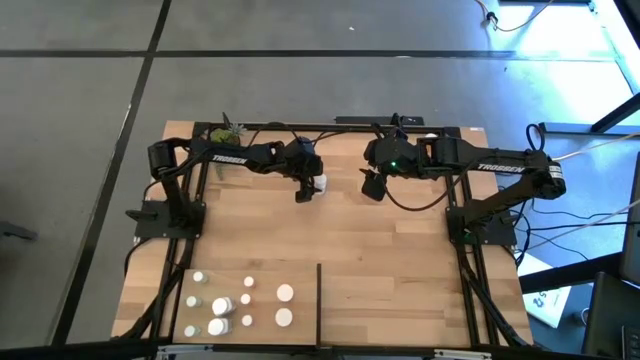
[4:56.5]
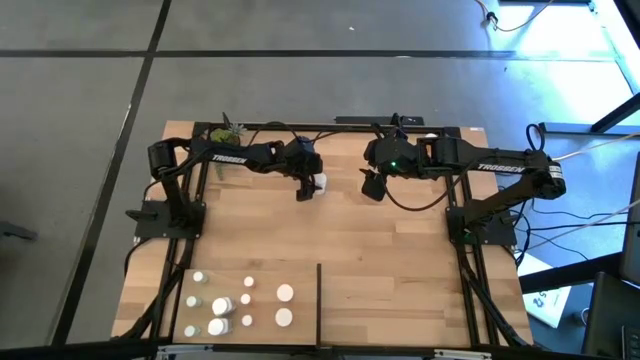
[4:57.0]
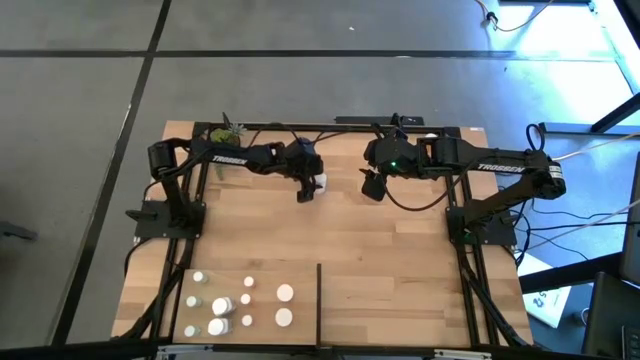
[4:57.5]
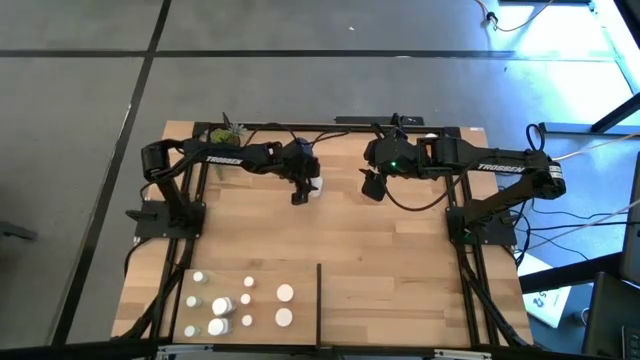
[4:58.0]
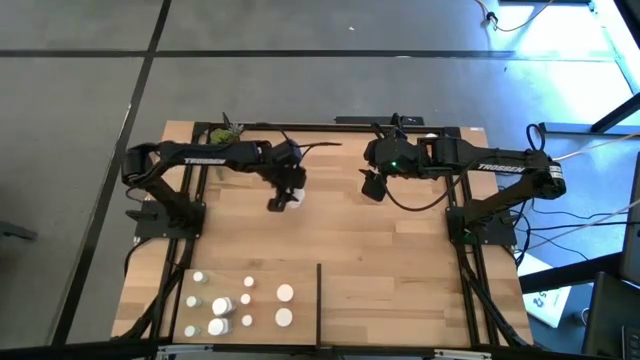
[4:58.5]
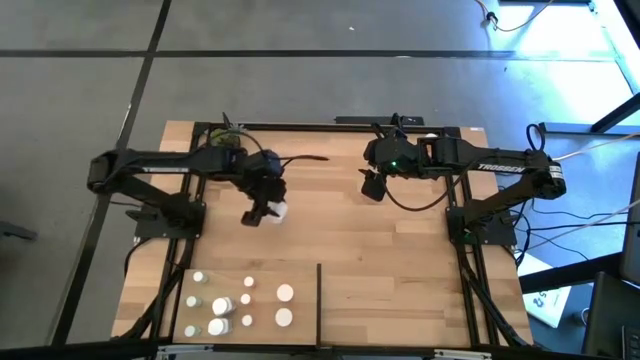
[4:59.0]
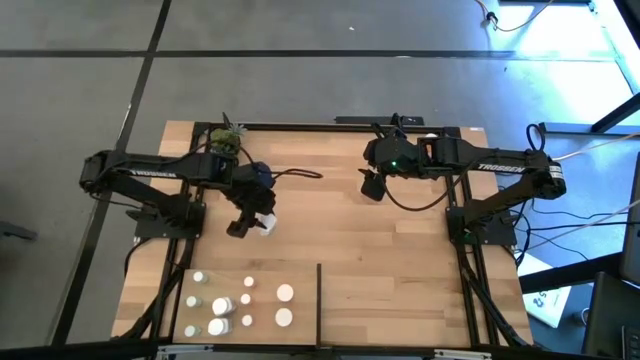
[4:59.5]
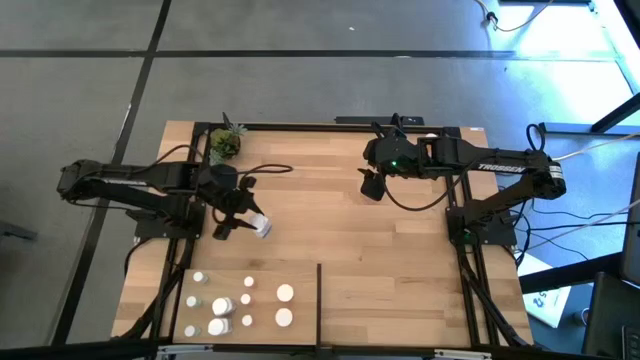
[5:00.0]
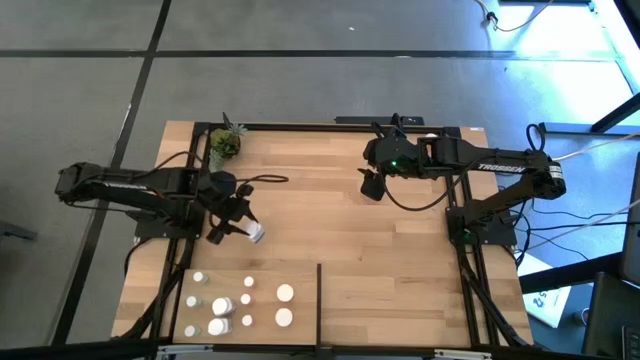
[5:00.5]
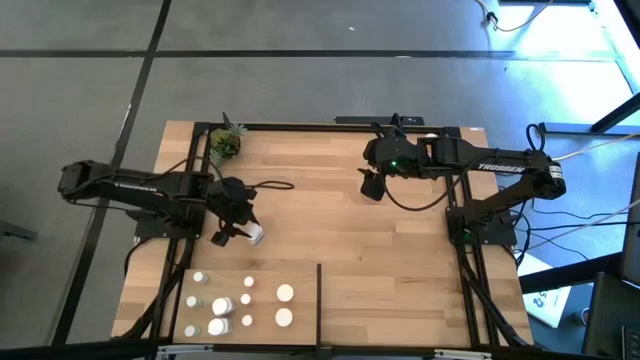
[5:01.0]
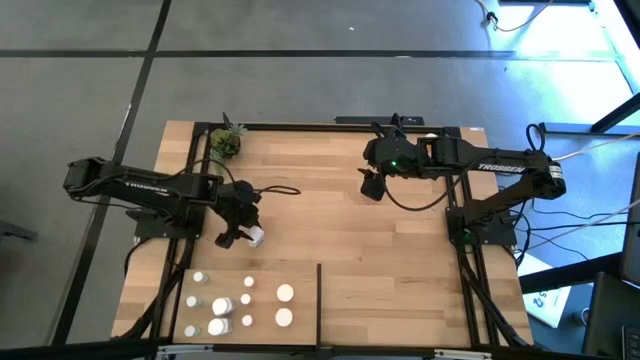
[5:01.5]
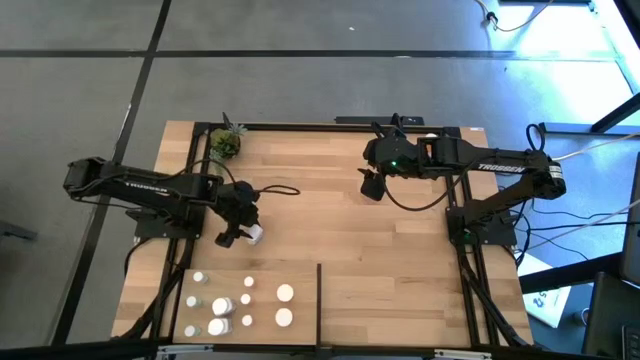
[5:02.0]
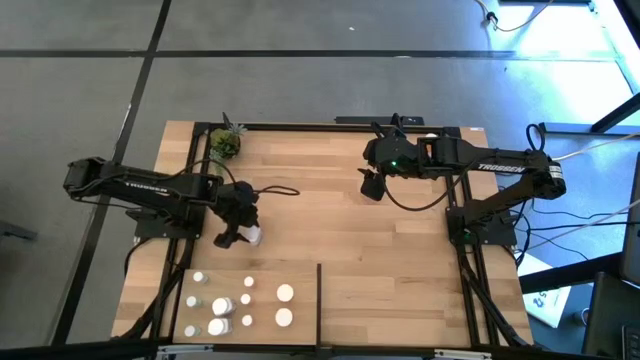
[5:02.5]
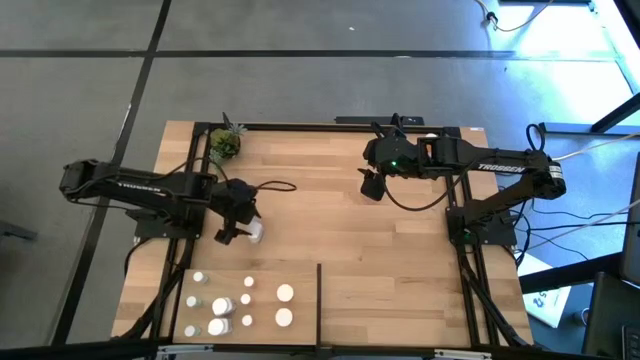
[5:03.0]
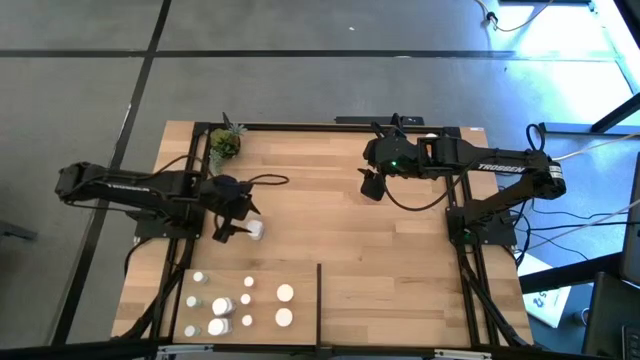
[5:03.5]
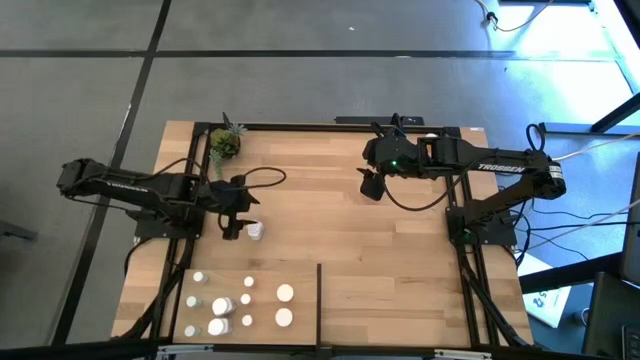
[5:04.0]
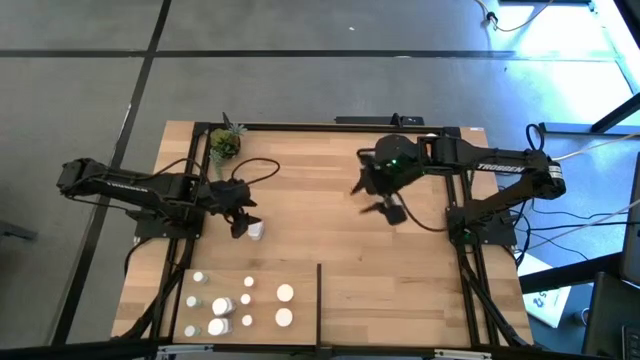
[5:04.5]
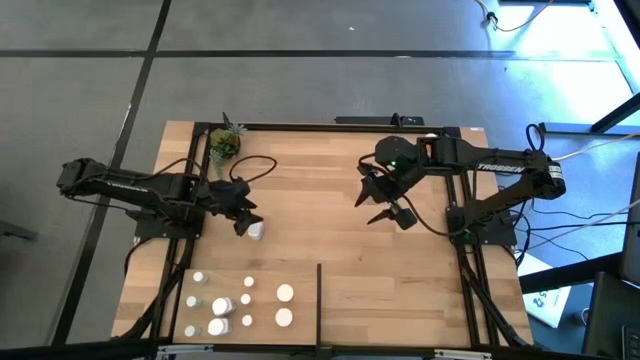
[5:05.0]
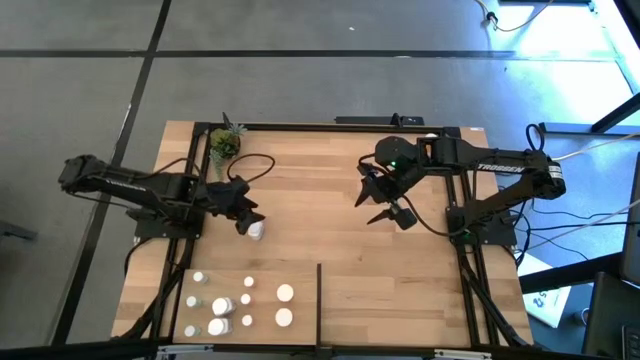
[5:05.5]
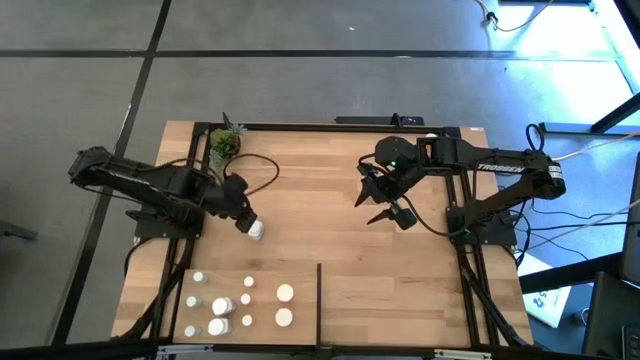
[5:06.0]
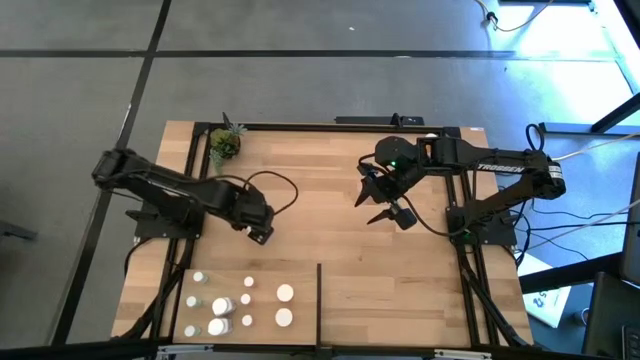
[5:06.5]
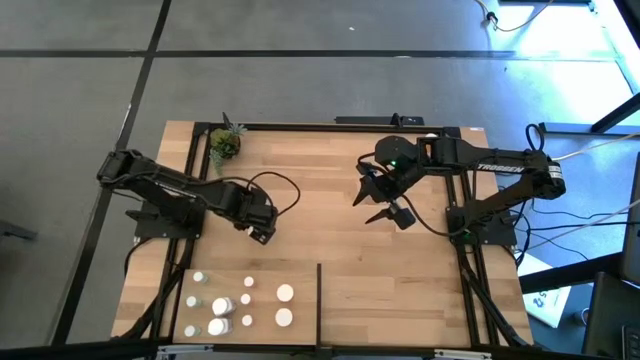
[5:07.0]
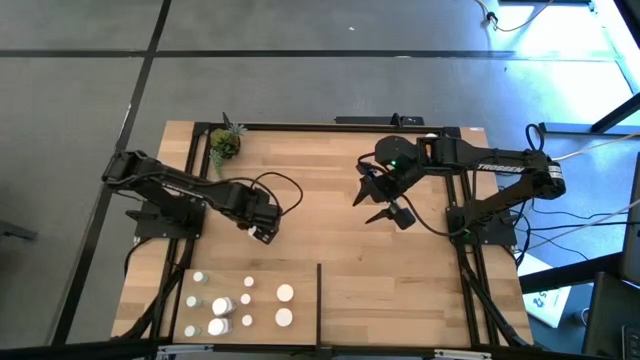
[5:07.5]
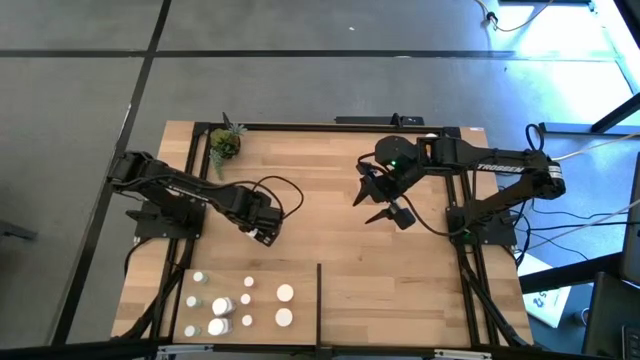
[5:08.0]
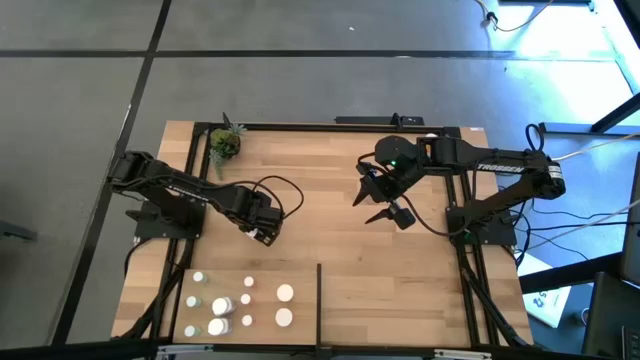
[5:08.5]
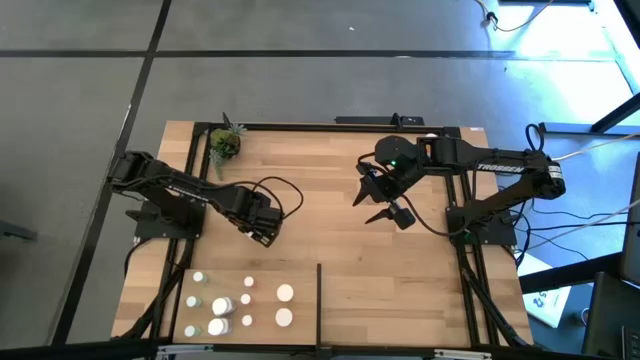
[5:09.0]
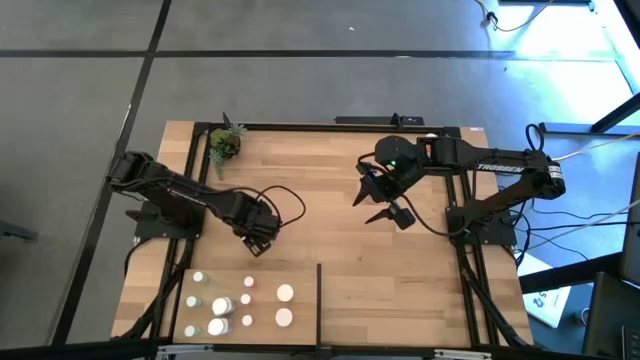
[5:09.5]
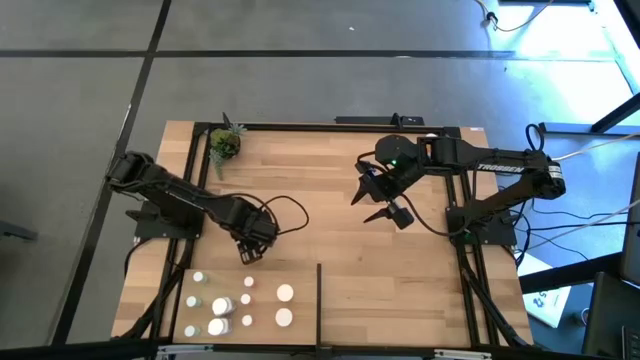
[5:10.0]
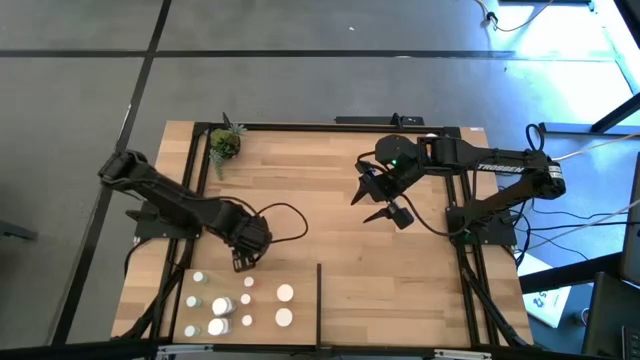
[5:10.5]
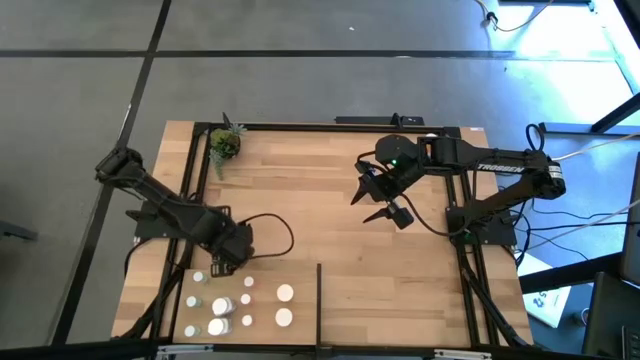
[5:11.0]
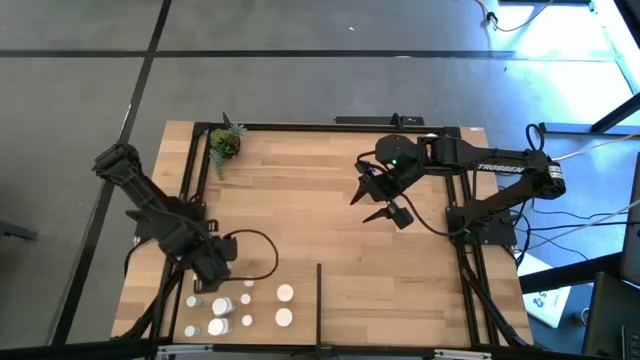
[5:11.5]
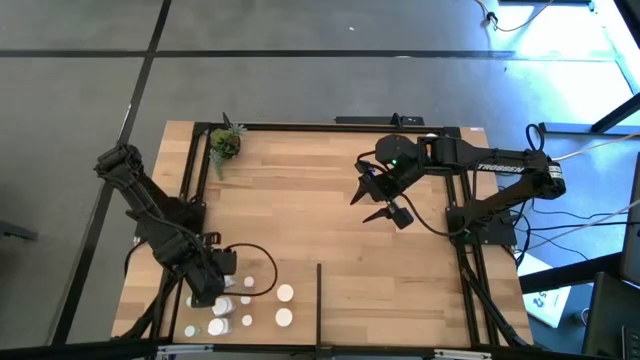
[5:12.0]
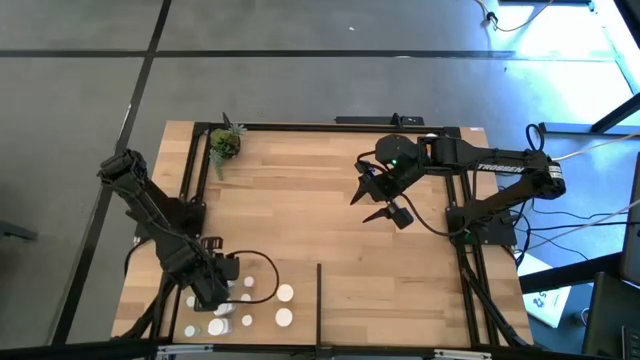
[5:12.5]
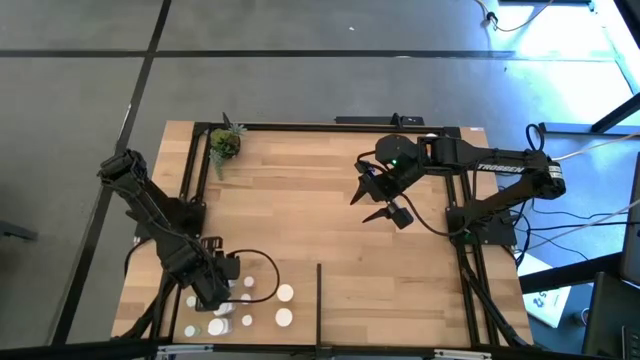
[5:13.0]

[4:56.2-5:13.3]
Task: Pick and place medicine bottles onto shelf by color
Put the white pill bottle on the shelf aligned with the other white pill bottle

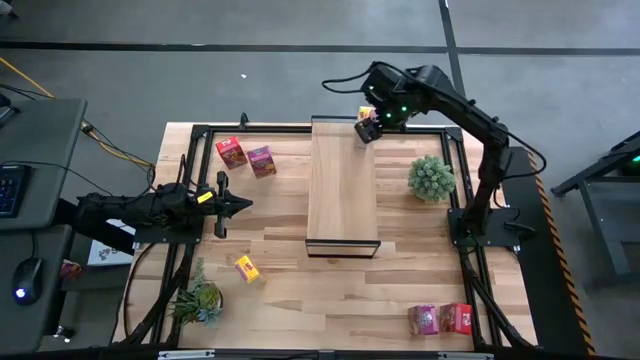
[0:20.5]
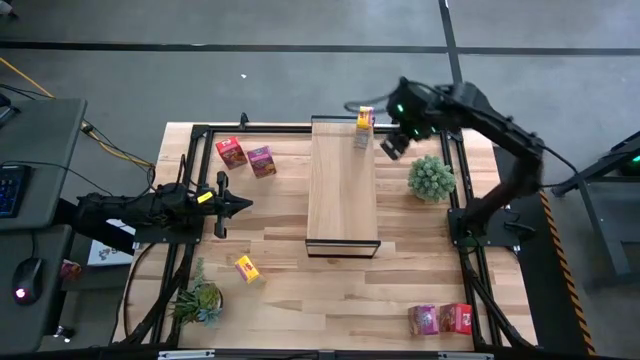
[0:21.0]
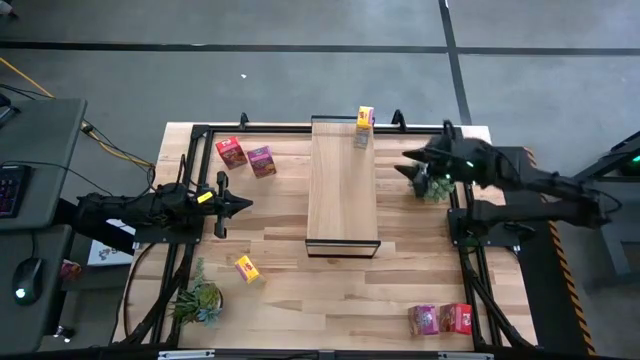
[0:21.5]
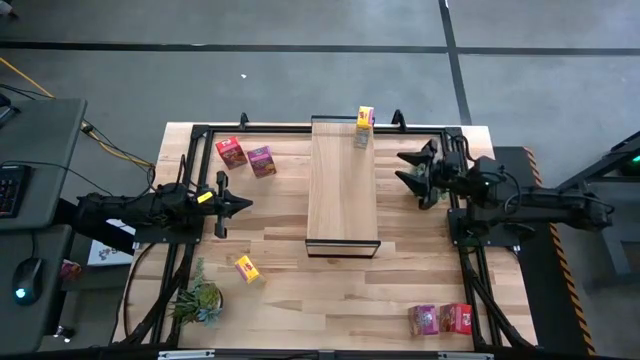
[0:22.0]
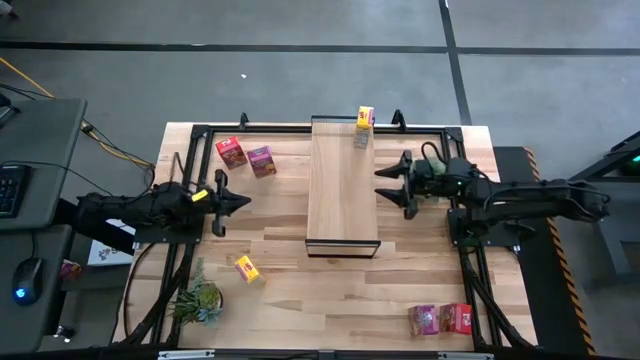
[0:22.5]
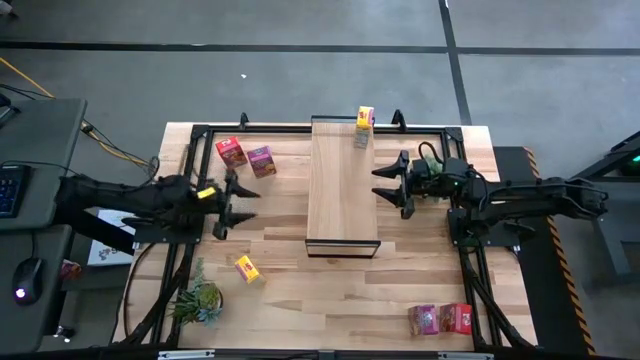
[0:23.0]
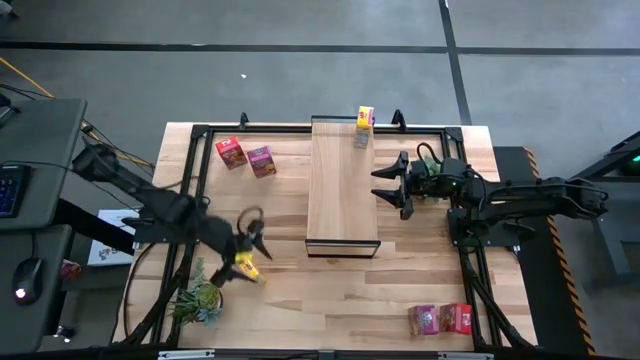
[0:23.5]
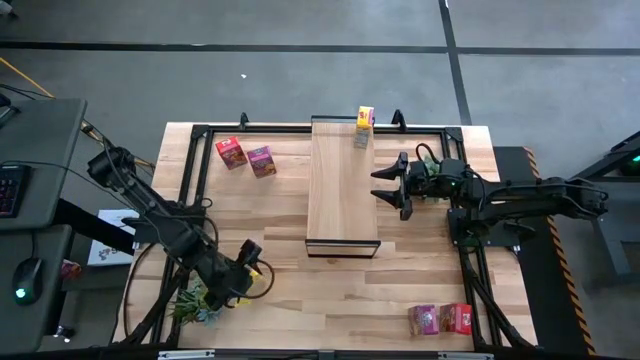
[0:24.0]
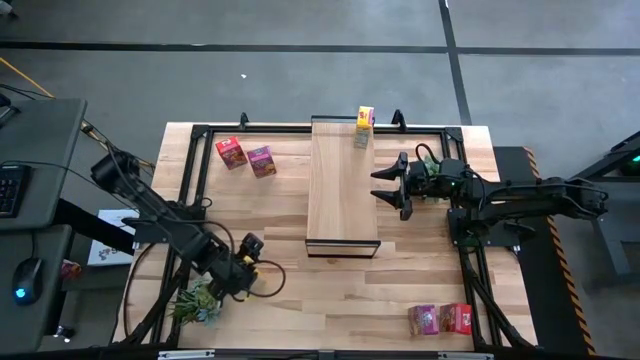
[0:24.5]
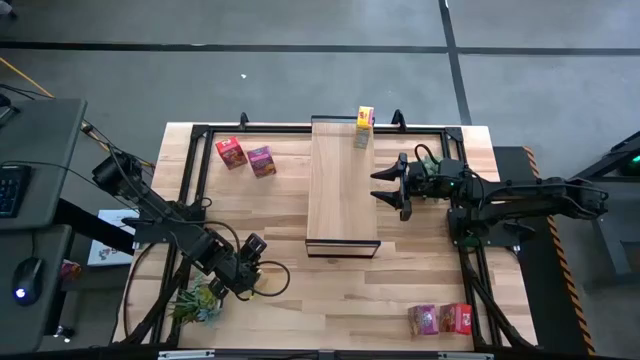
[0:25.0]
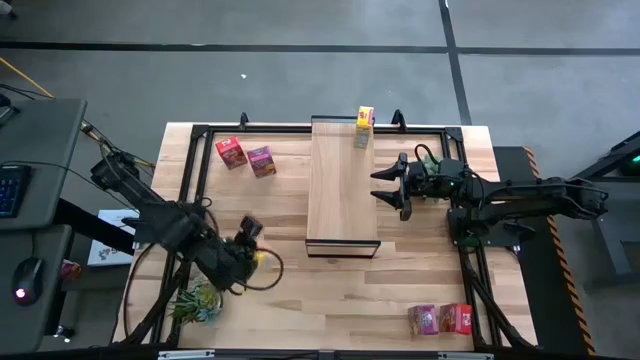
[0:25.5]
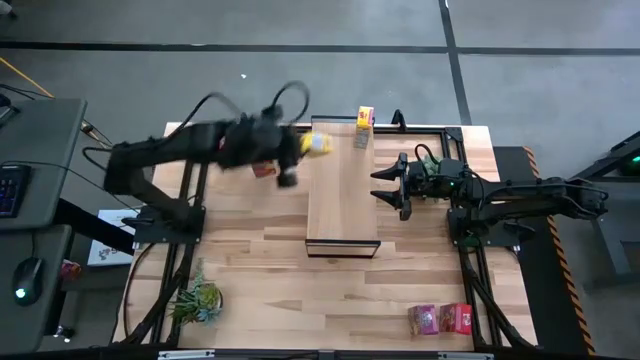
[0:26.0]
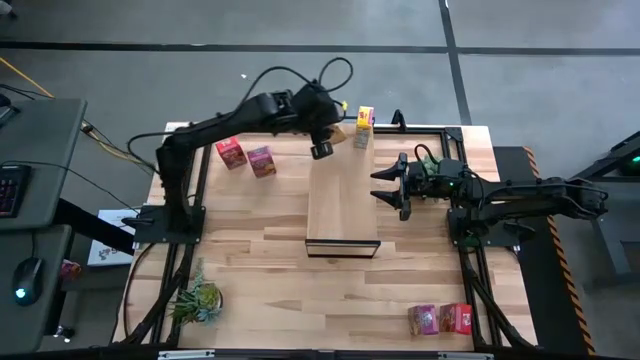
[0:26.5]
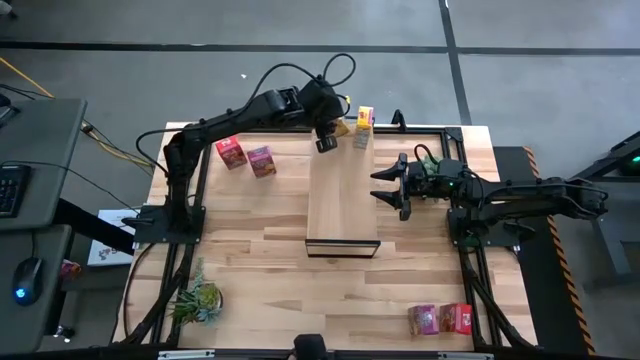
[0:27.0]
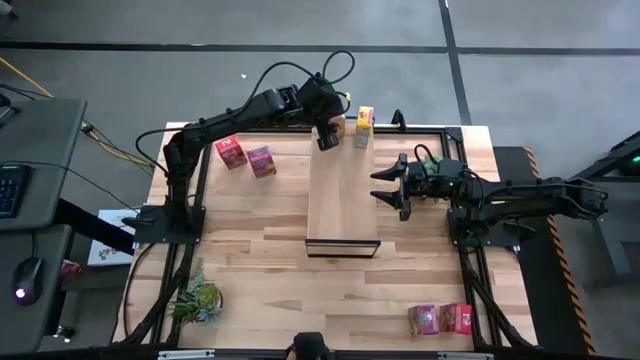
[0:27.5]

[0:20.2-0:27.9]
Task: Stack cereal on shelf
Put the yellow cereal box on the shelf
